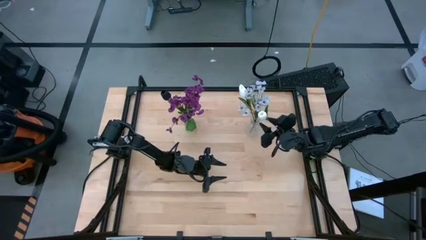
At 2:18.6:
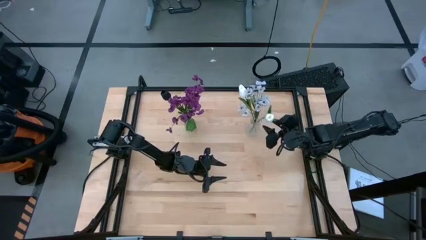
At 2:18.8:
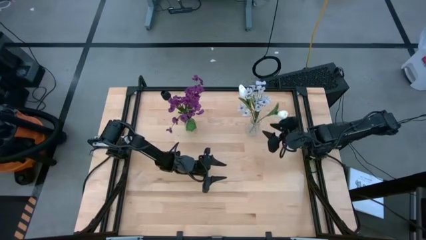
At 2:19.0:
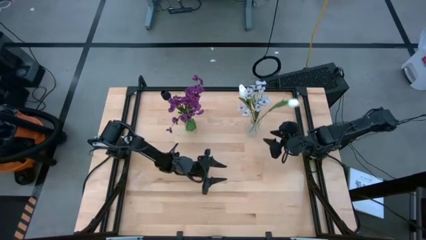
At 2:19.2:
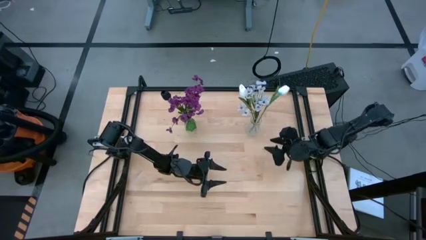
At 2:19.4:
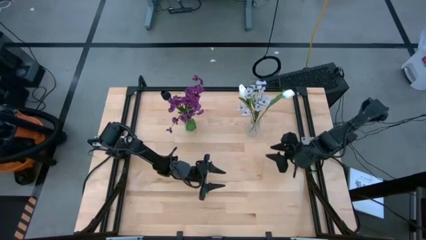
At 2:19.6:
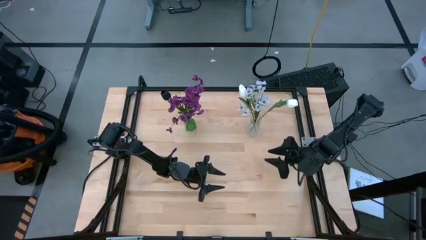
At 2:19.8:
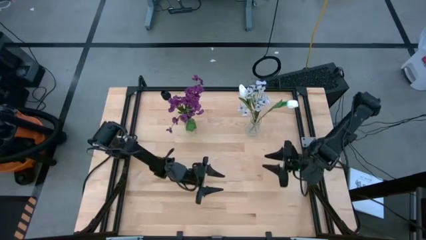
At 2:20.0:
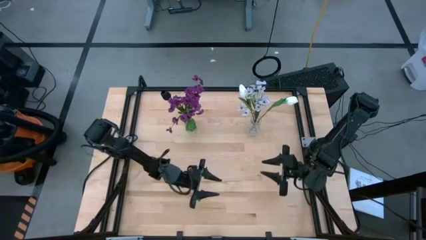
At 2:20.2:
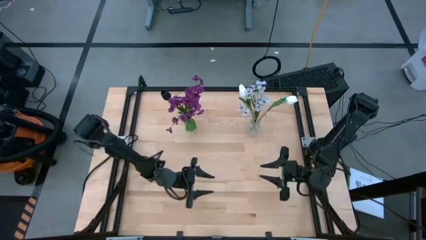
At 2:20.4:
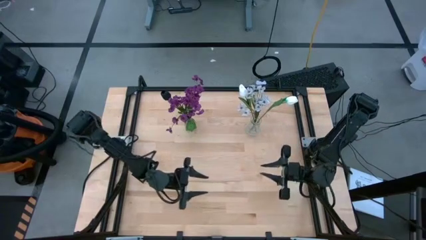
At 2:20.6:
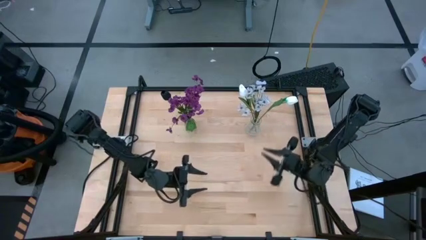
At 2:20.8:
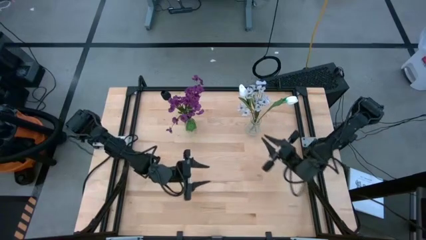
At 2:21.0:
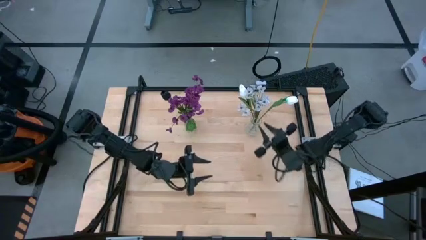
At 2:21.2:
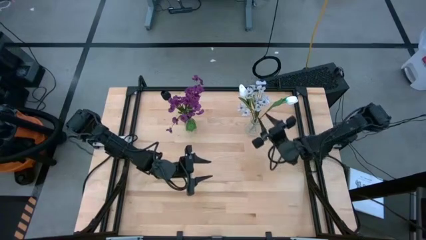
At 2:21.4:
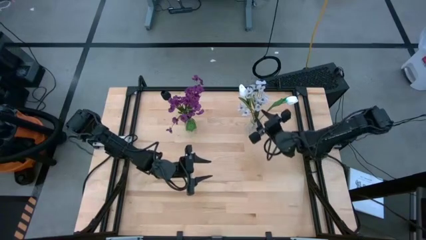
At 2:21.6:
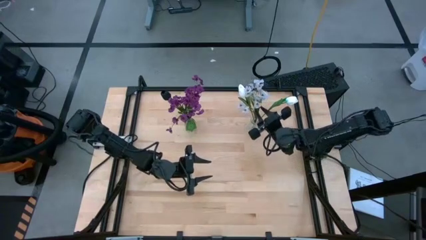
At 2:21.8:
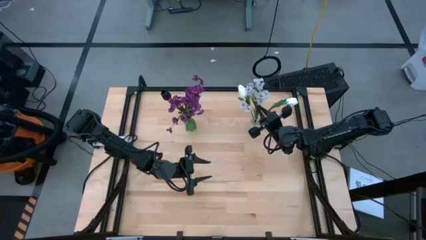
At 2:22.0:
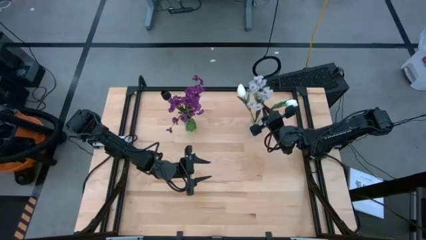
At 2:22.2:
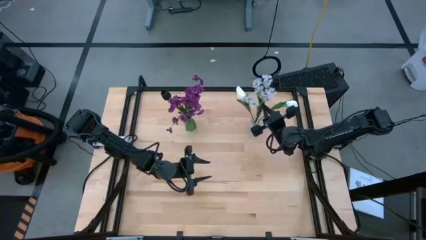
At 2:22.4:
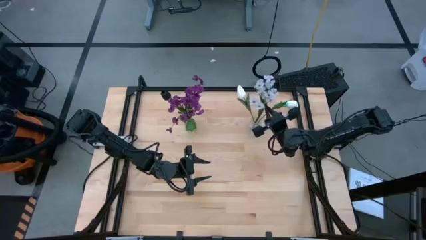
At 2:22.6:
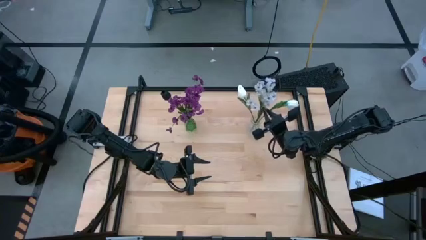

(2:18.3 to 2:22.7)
Task: Sort flowers into vase by color
Adjust the white flowers in the transparent vase

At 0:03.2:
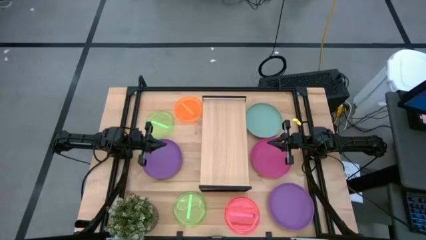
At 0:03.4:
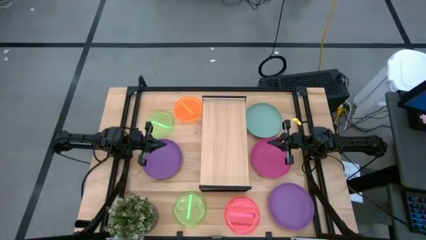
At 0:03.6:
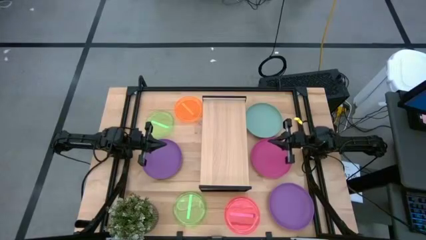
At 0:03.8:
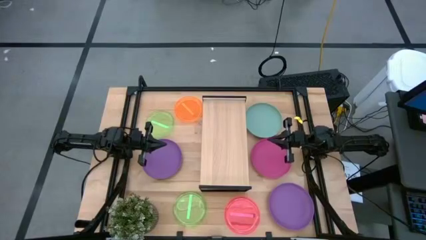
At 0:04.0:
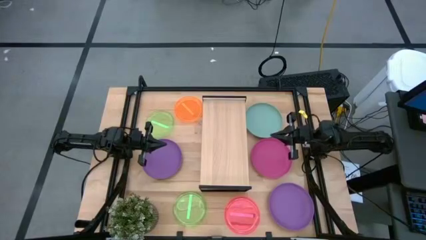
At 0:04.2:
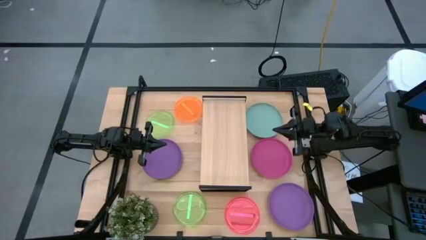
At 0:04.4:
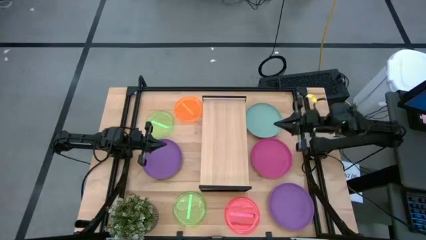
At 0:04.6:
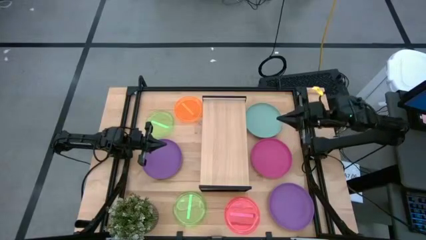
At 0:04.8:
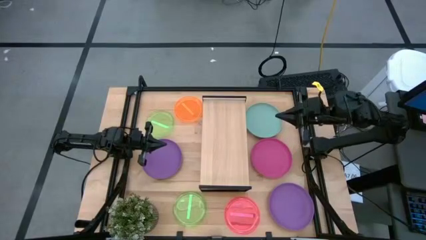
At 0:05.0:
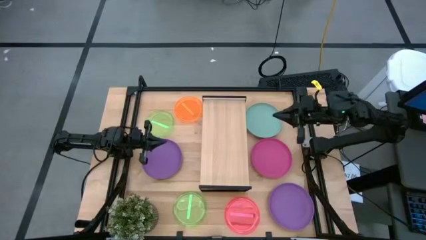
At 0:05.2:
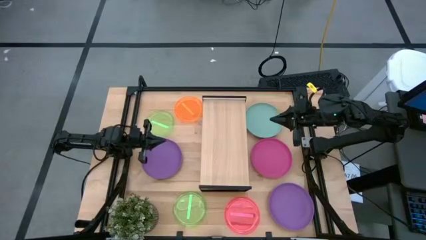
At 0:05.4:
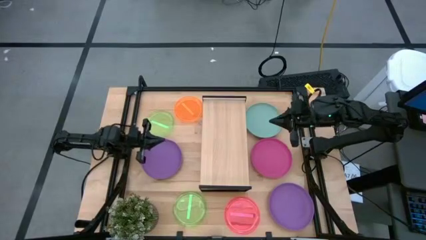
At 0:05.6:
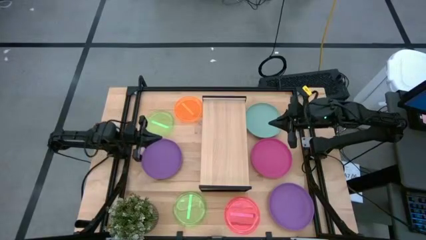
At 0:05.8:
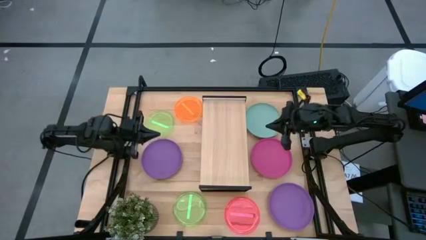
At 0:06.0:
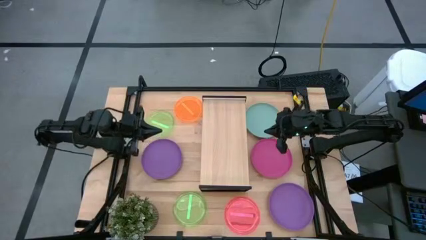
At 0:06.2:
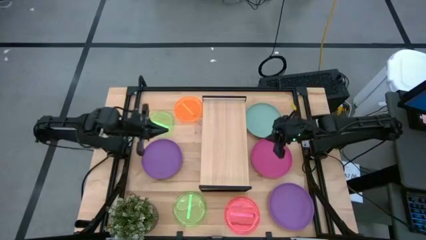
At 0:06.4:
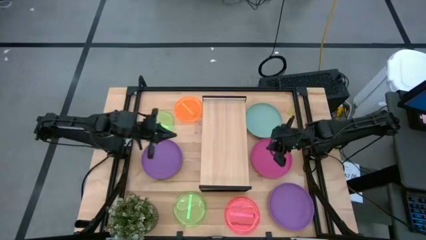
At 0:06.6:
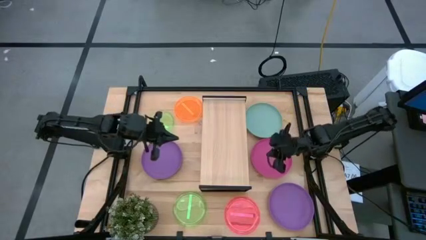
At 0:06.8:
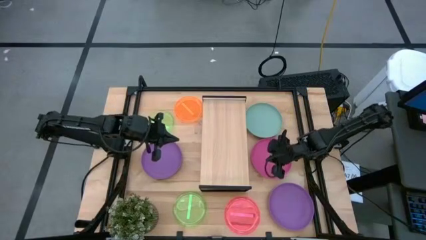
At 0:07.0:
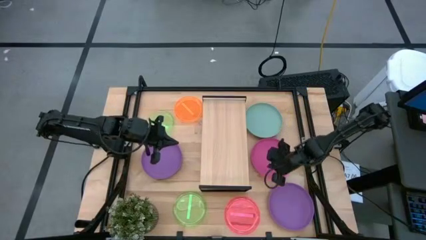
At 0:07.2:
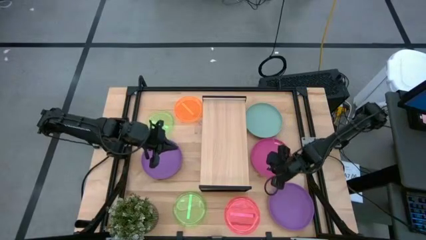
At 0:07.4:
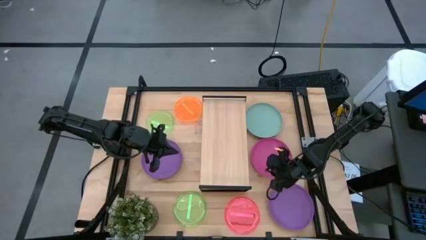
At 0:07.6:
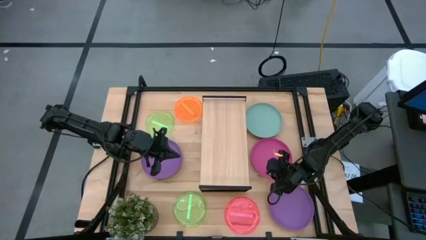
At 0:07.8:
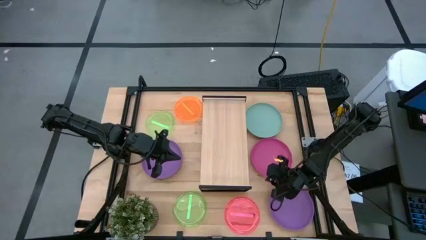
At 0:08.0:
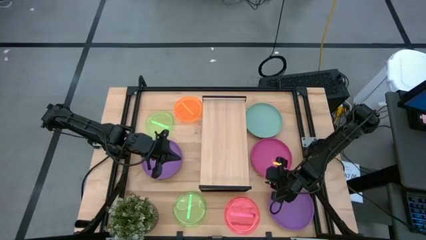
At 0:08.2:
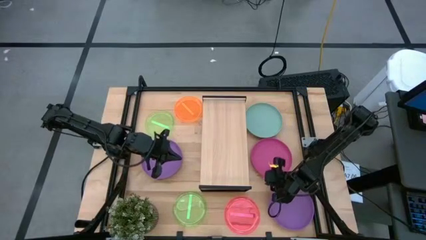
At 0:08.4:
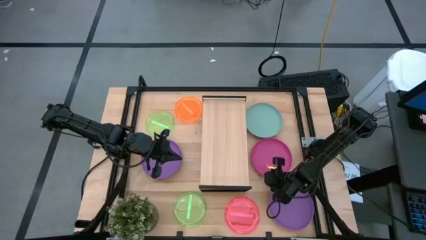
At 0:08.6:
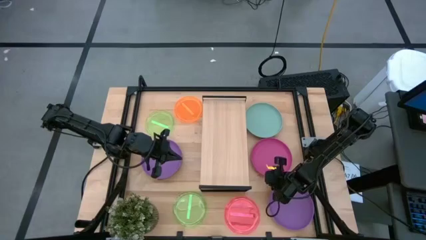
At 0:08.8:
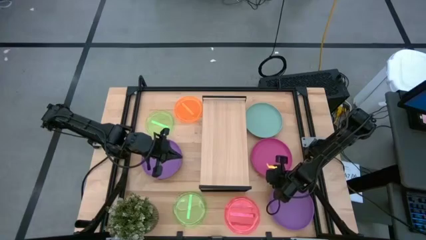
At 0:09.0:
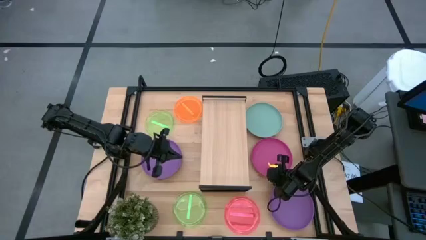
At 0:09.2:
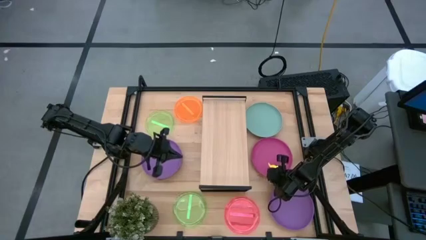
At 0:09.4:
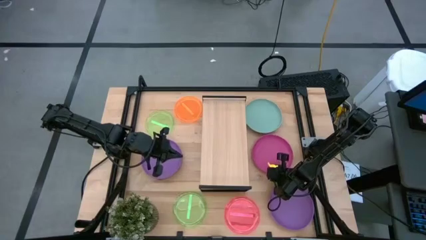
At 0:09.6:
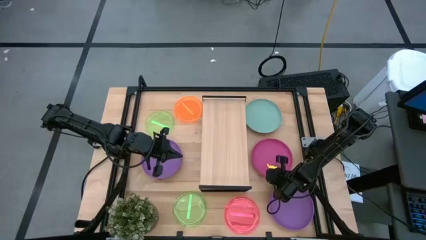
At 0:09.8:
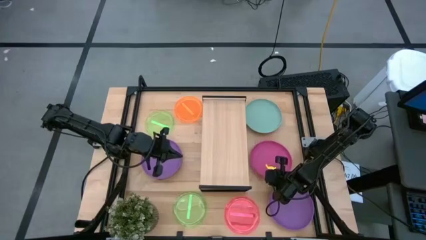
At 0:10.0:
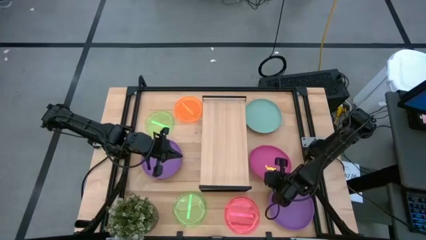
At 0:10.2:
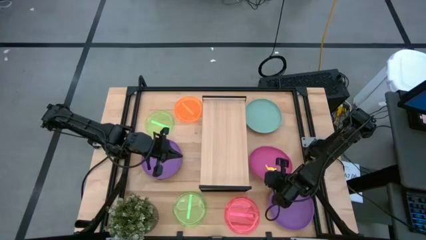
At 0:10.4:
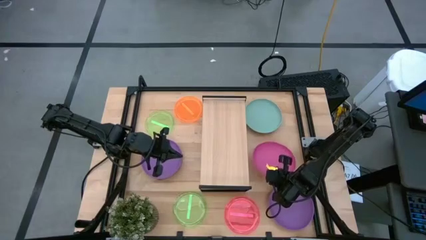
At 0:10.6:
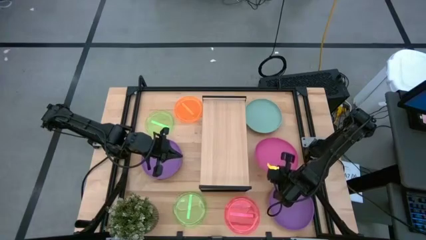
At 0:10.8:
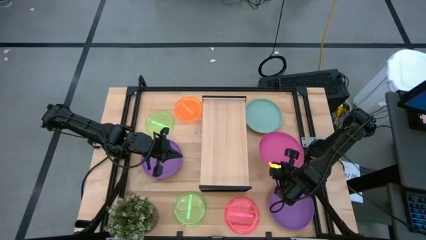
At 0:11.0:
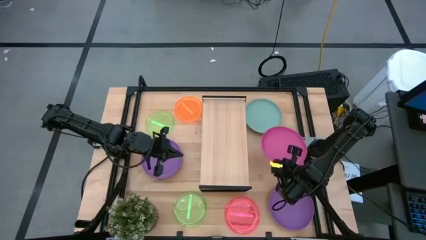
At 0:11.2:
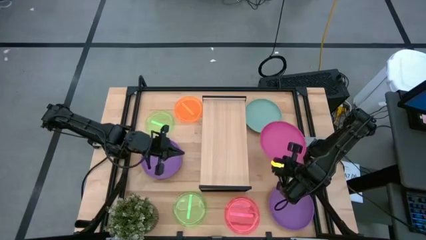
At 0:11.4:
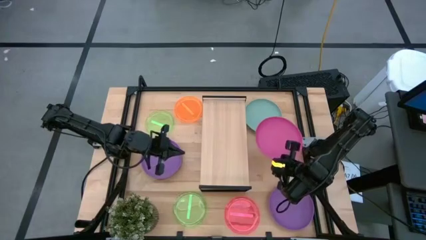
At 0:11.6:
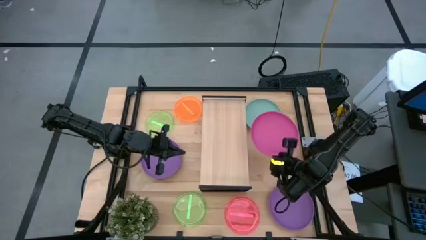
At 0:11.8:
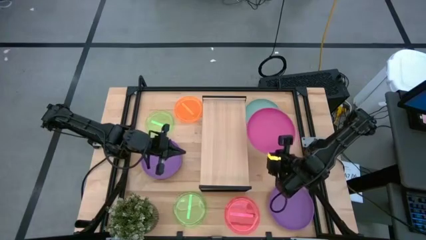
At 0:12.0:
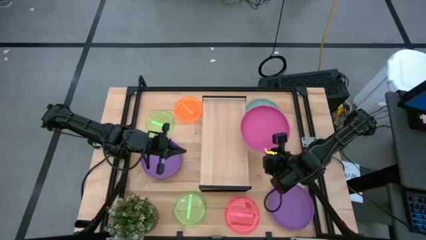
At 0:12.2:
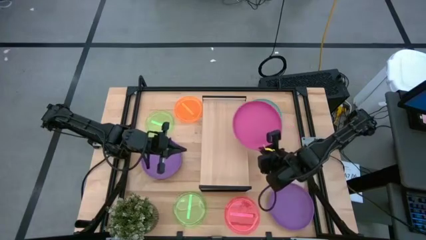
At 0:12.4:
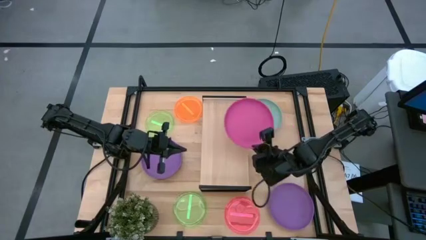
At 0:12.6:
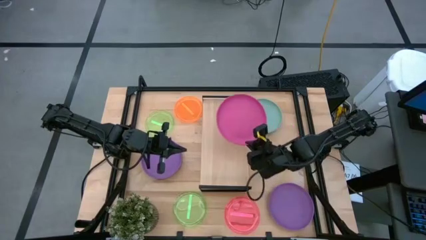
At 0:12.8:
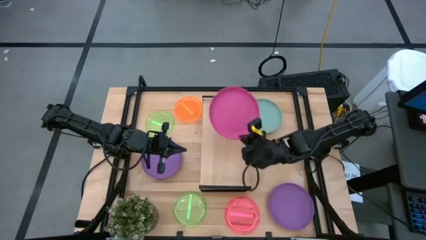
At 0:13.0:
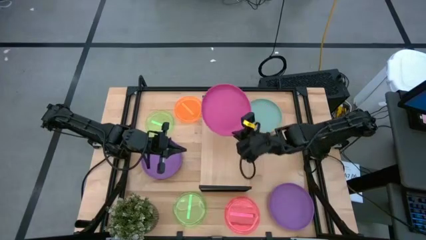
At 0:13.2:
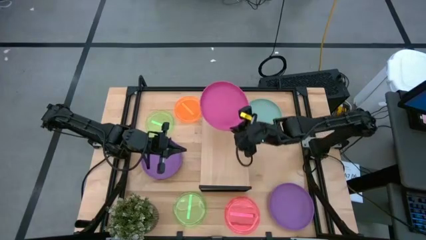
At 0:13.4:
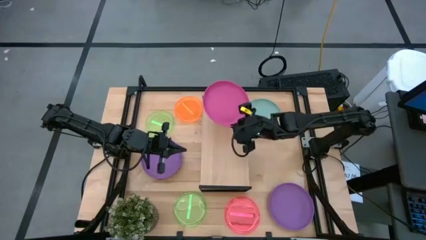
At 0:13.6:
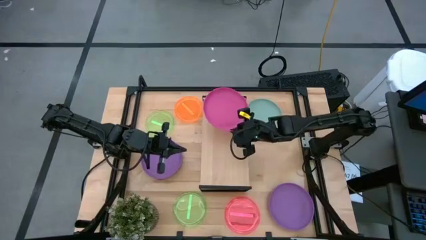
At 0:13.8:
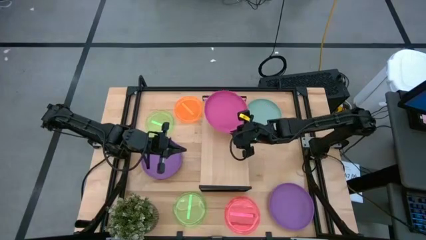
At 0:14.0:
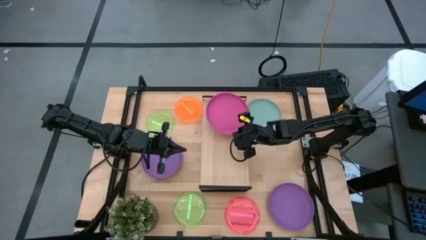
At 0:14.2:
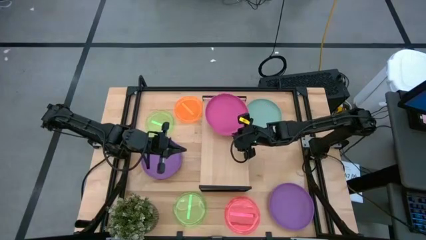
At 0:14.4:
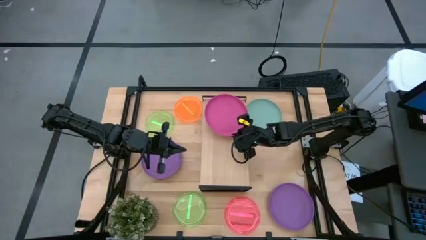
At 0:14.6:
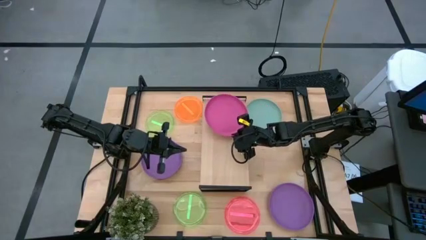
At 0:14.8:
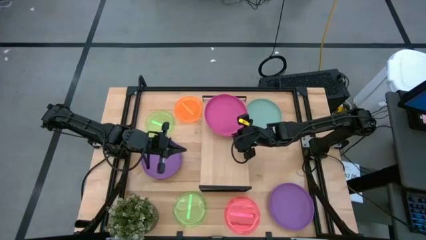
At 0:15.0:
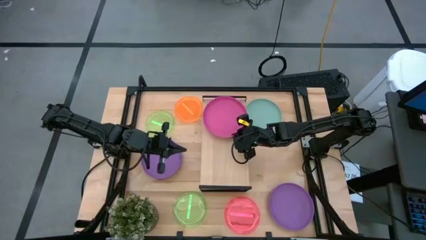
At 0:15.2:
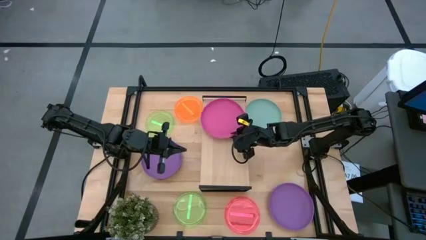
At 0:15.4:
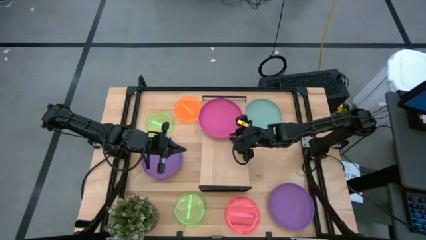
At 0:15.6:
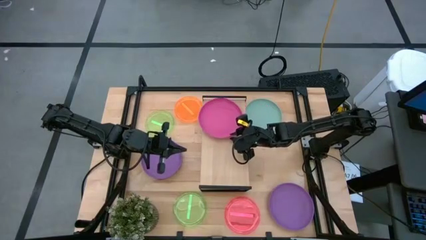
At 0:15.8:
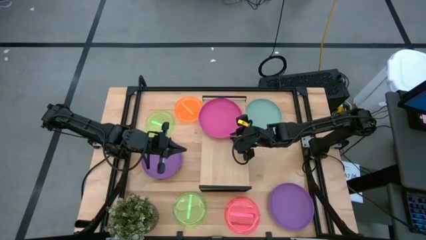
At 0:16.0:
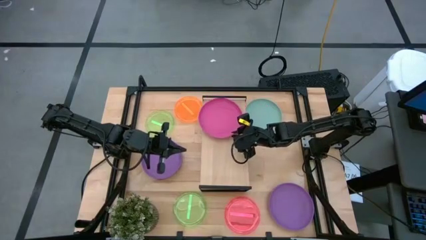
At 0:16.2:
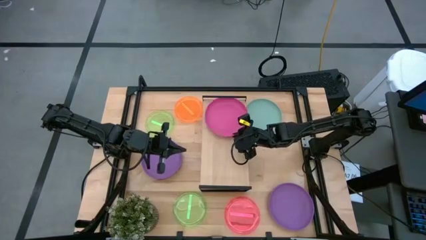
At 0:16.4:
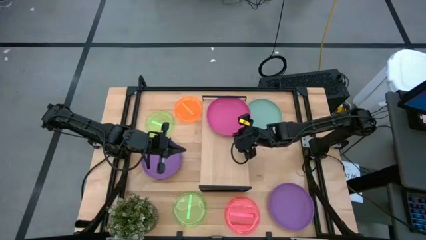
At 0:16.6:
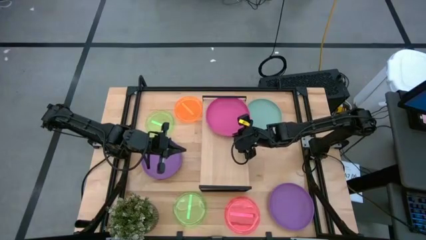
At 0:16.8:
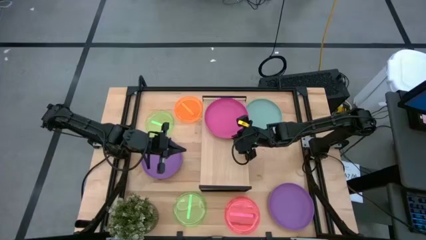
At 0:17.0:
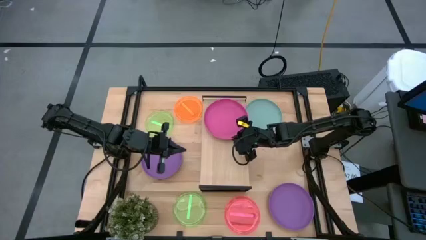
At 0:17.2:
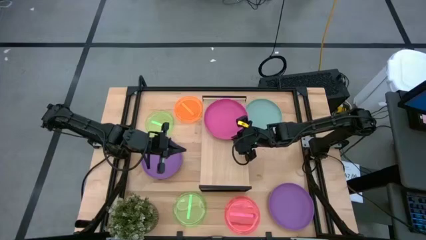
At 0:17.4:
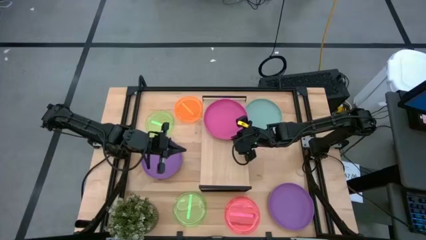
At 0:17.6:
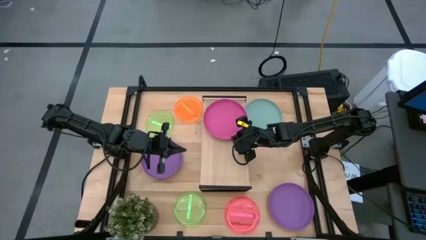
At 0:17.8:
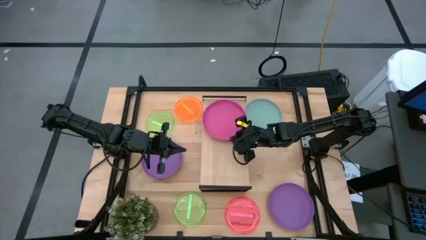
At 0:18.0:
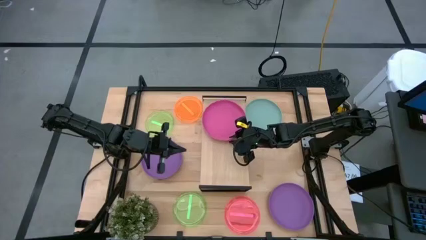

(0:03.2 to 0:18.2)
Task: Place and stack plates onto a shelf
Put the pink plate on the shelf
